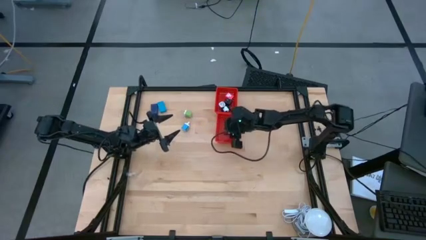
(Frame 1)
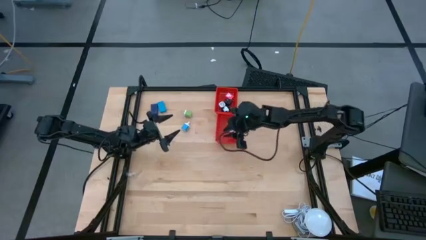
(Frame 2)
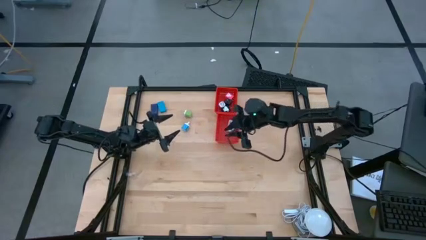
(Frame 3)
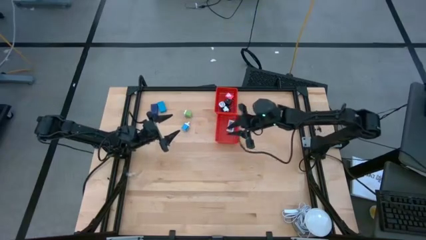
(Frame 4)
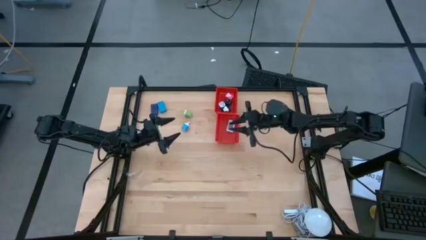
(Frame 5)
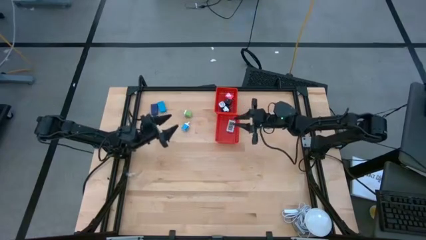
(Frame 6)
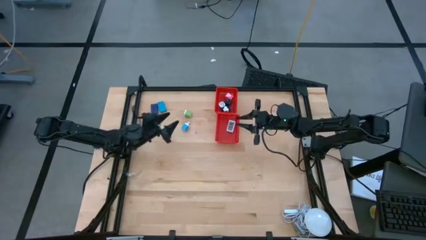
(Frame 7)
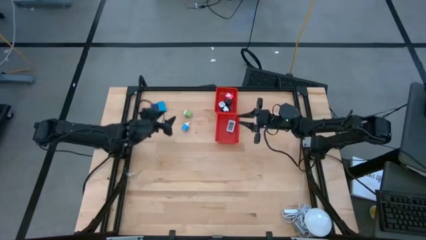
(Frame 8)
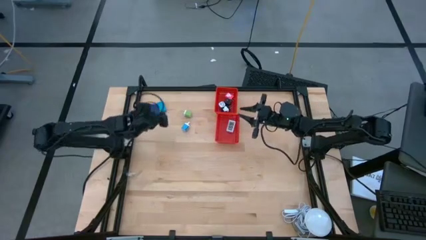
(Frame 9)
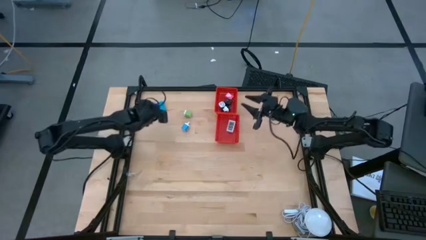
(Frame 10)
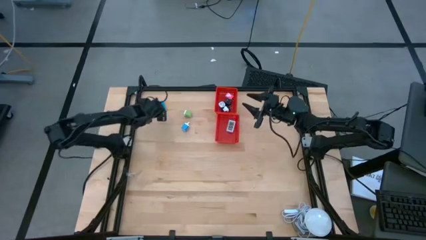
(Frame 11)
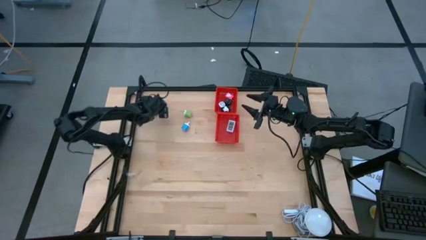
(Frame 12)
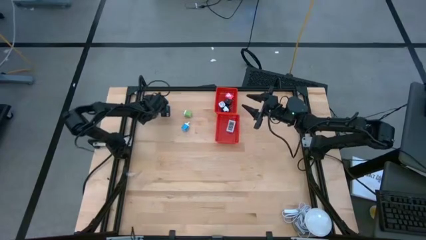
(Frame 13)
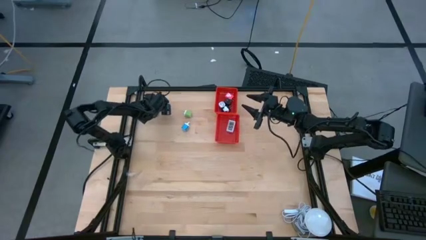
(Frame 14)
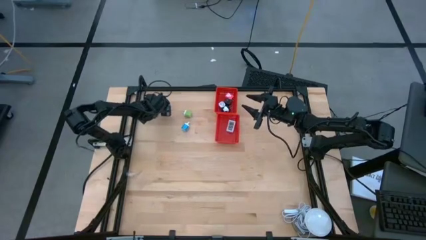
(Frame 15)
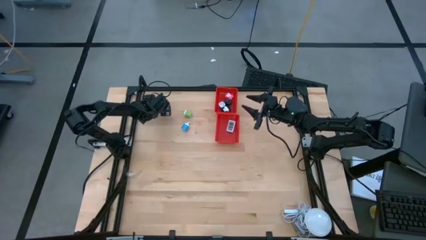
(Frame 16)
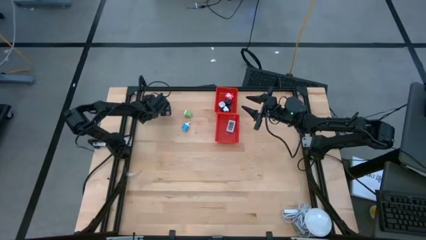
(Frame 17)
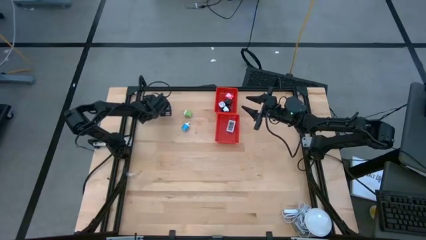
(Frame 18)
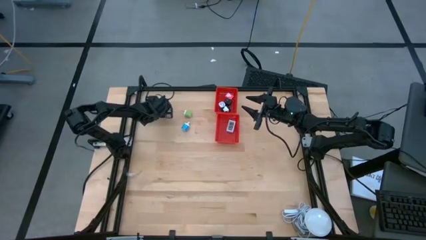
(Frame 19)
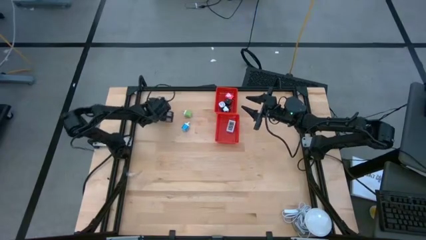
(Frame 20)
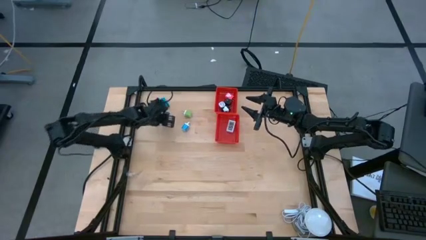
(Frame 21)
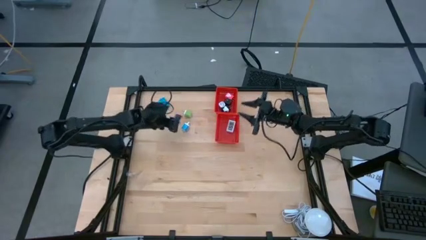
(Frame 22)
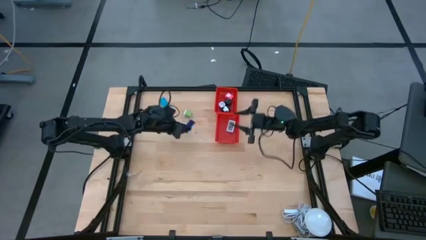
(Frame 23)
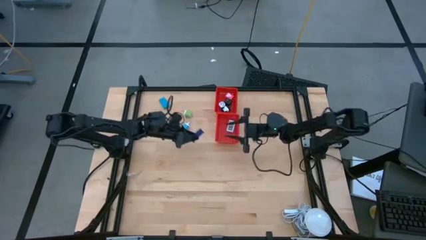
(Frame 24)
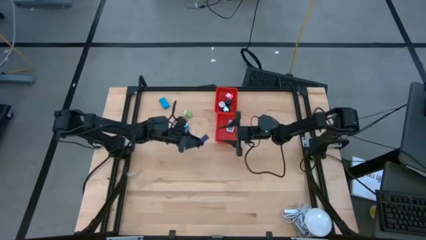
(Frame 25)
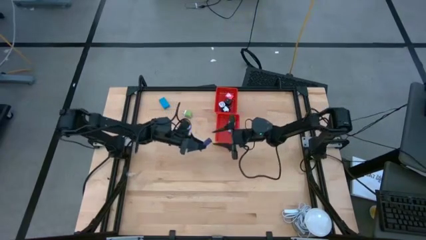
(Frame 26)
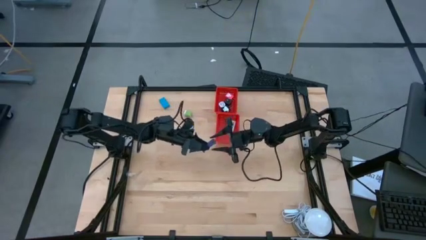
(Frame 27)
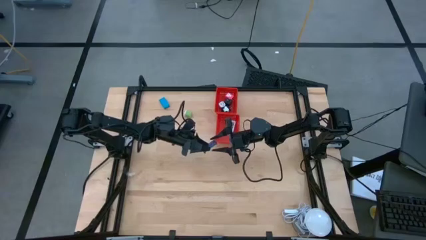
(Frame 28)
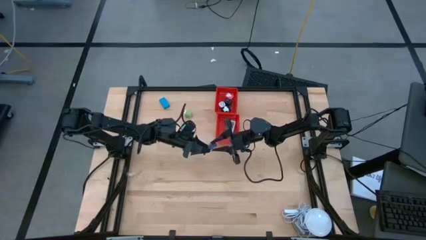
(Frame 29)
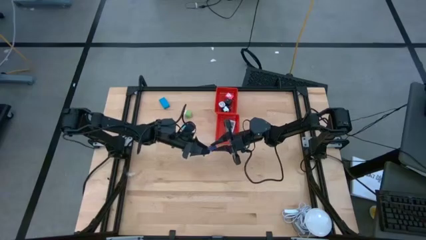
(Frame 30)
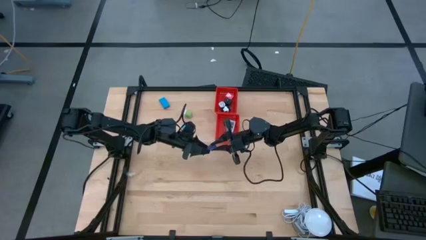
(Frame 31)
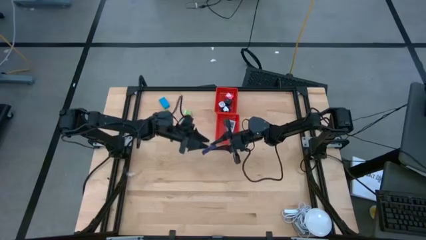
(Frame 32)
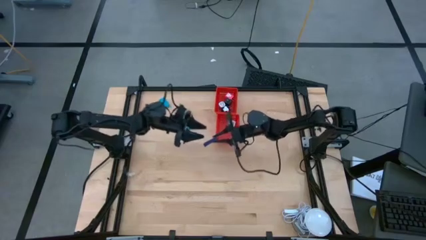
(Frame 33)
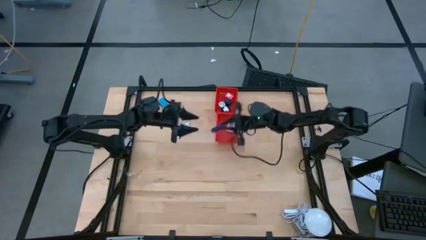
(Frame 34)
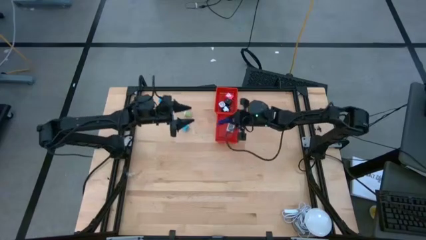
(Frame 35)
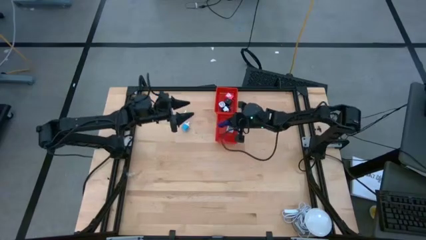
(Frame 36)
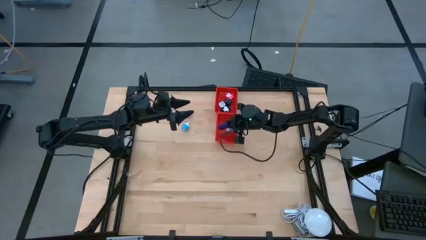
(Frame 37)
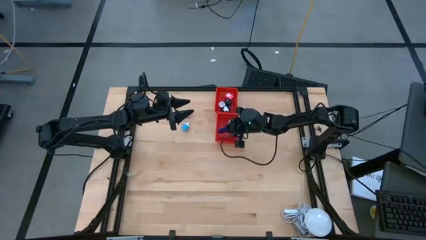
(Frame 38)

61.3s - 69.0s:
Task: Pick & Place Office items
Put the blue digital clock into the bottom red basket

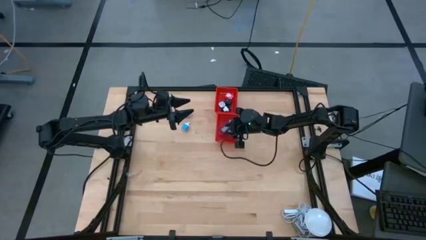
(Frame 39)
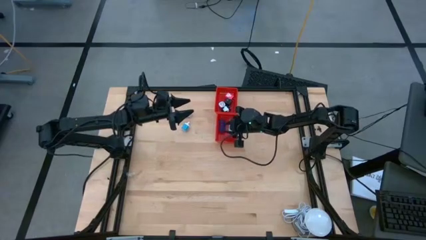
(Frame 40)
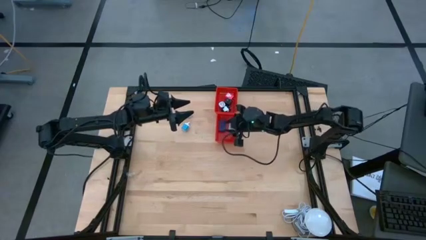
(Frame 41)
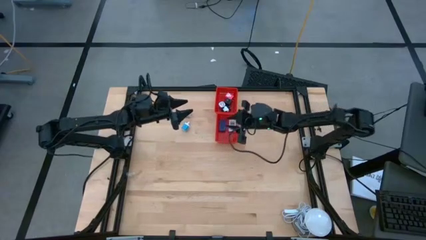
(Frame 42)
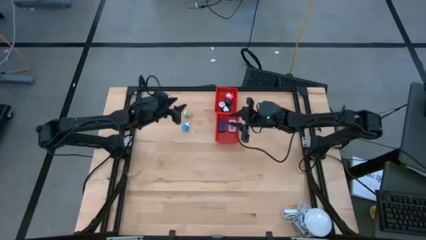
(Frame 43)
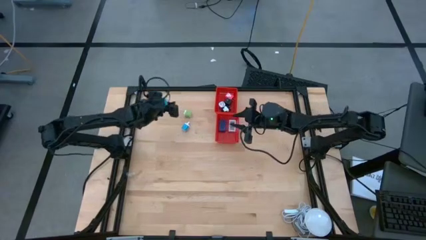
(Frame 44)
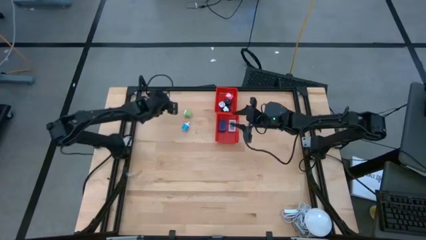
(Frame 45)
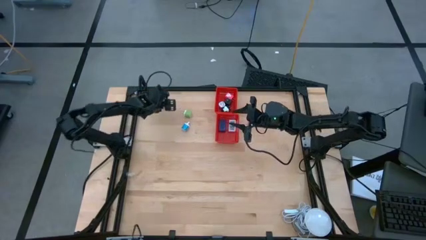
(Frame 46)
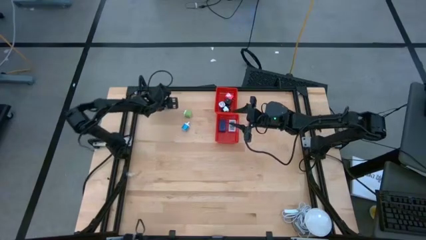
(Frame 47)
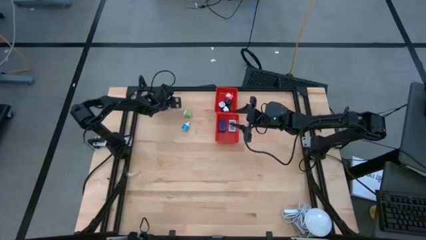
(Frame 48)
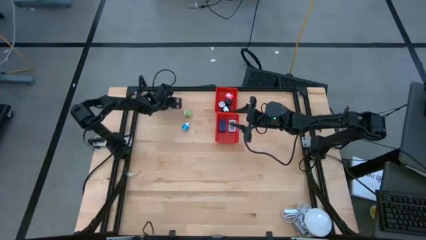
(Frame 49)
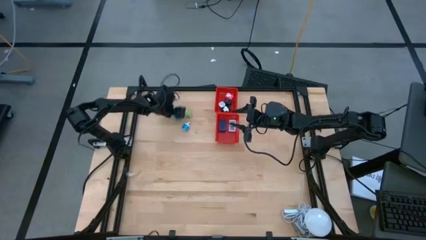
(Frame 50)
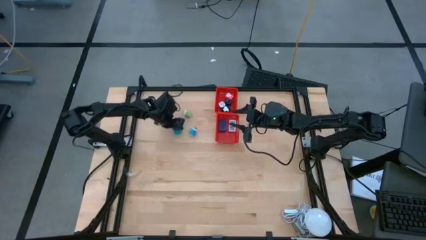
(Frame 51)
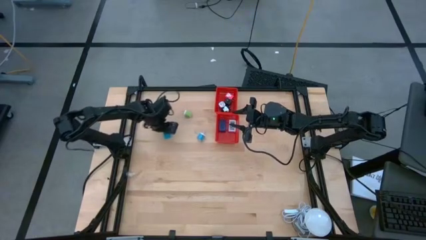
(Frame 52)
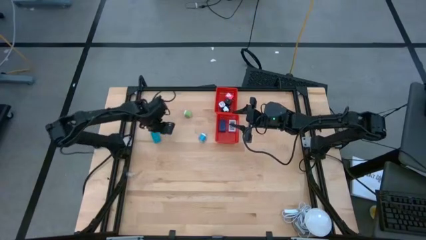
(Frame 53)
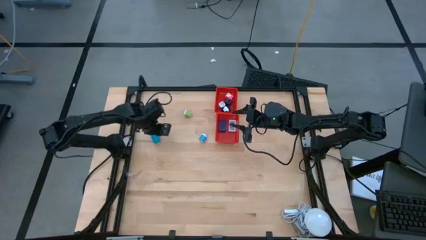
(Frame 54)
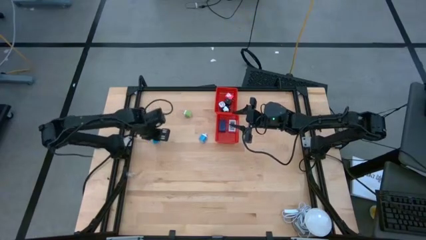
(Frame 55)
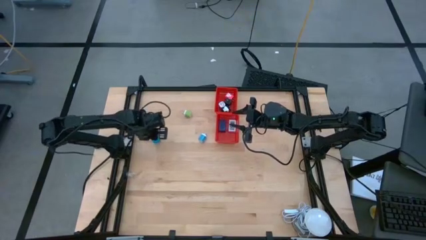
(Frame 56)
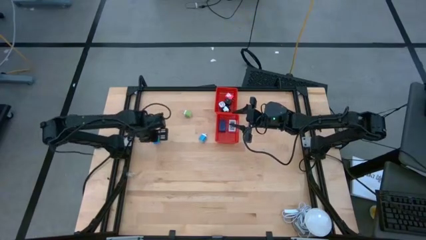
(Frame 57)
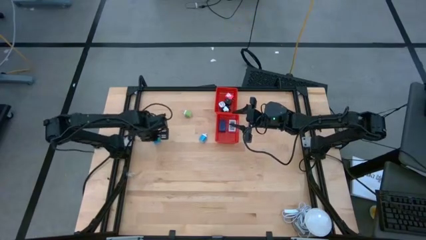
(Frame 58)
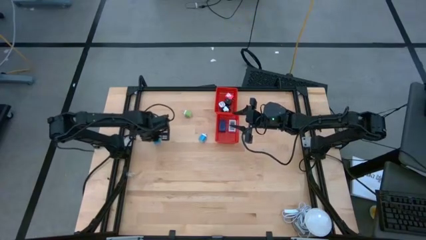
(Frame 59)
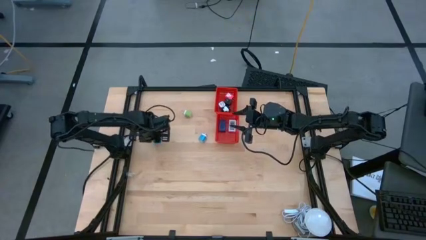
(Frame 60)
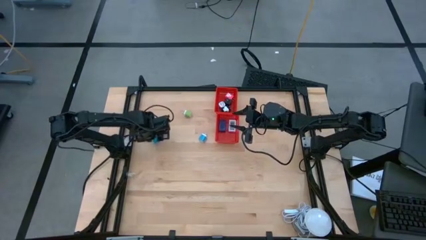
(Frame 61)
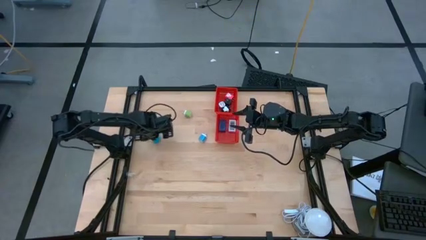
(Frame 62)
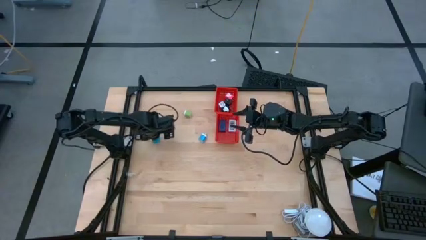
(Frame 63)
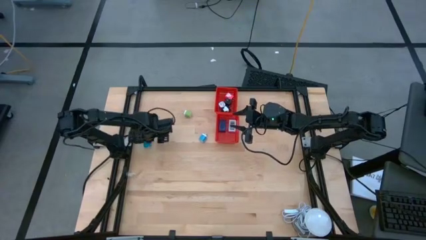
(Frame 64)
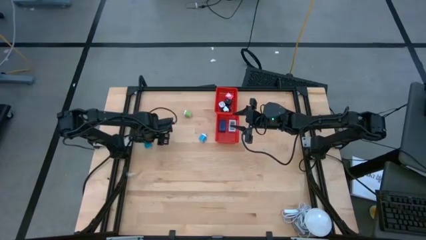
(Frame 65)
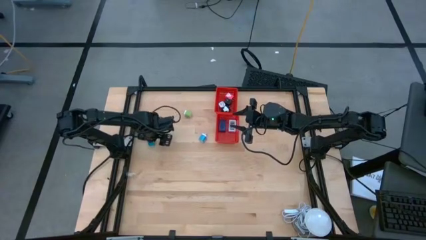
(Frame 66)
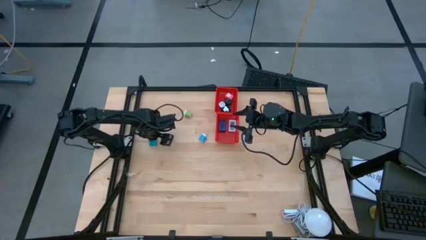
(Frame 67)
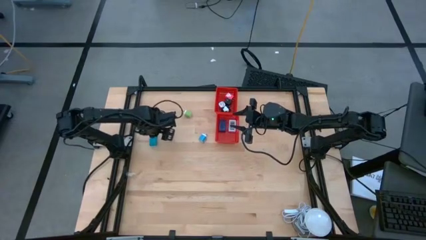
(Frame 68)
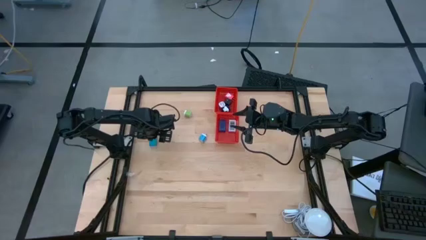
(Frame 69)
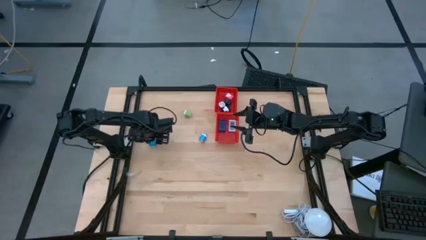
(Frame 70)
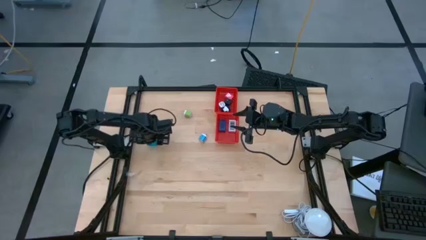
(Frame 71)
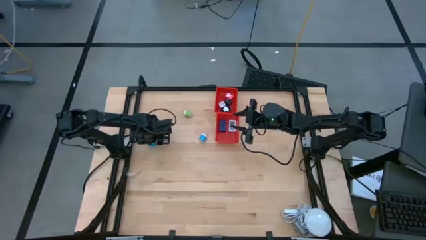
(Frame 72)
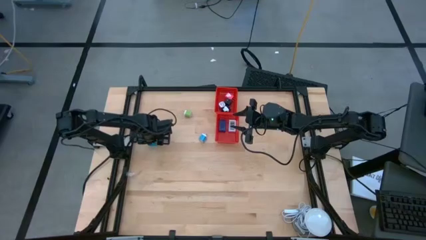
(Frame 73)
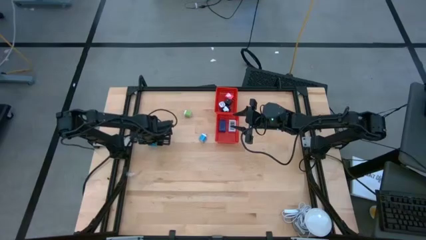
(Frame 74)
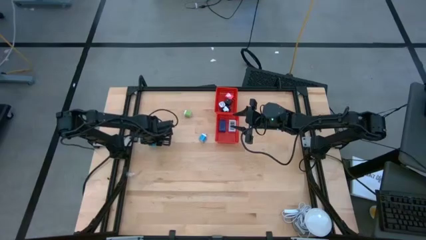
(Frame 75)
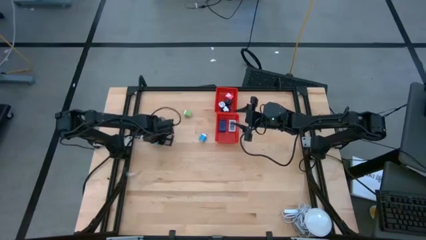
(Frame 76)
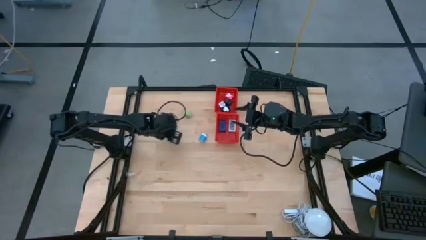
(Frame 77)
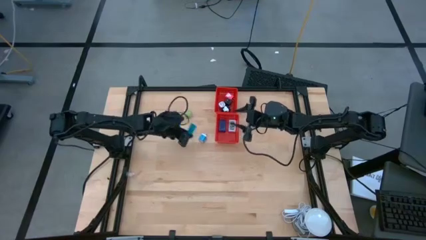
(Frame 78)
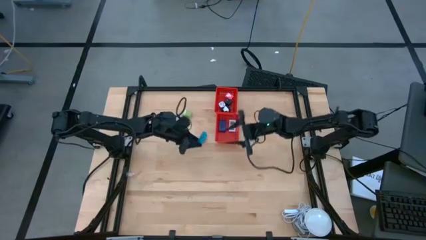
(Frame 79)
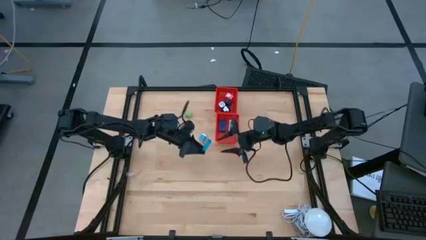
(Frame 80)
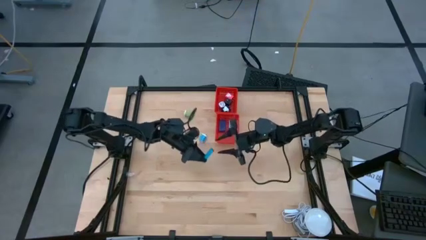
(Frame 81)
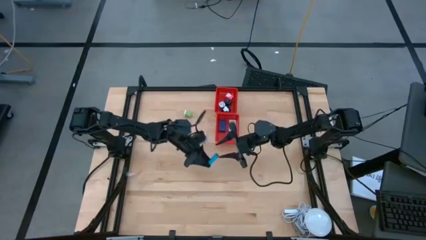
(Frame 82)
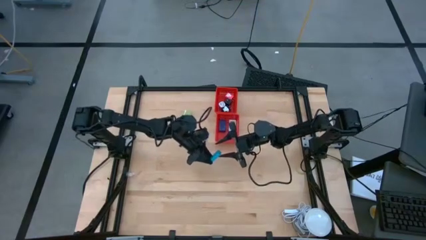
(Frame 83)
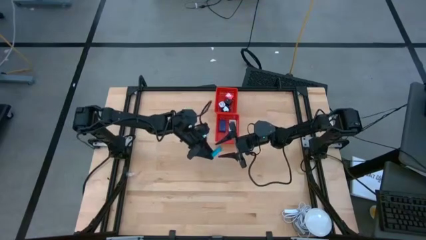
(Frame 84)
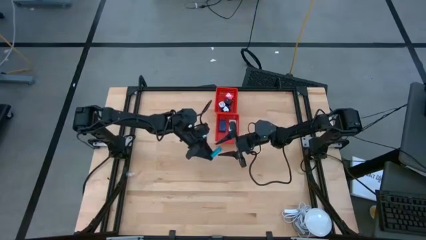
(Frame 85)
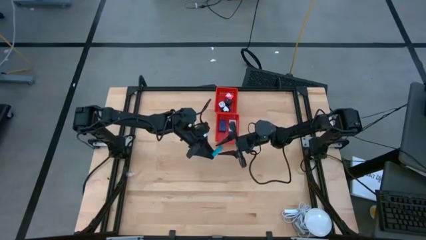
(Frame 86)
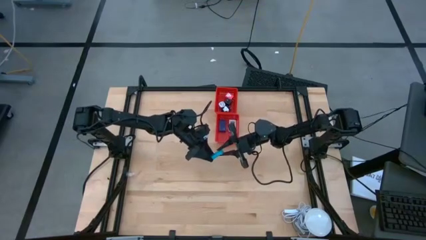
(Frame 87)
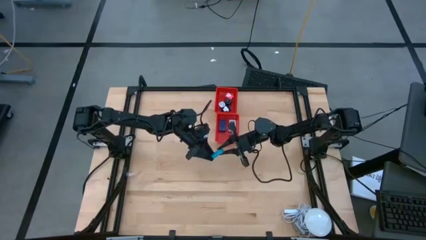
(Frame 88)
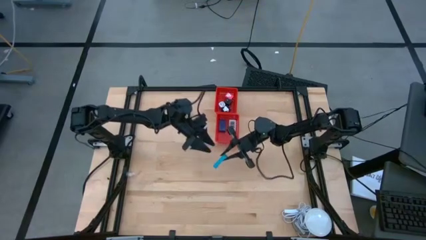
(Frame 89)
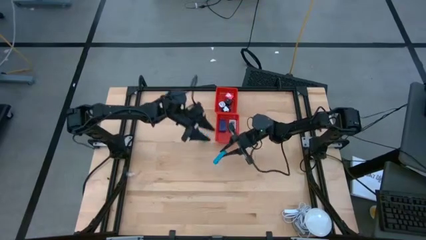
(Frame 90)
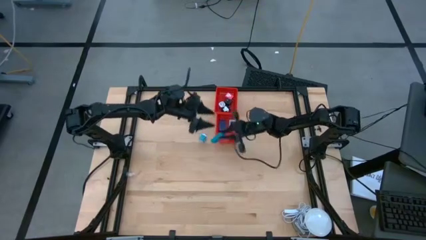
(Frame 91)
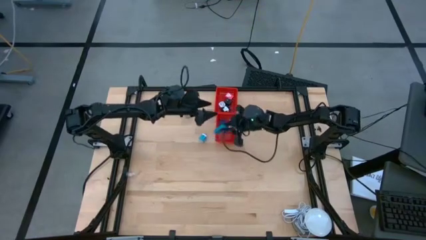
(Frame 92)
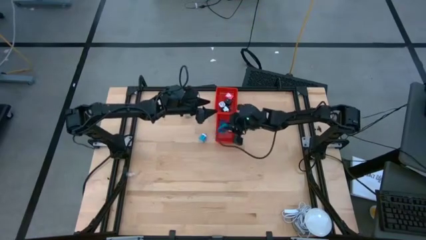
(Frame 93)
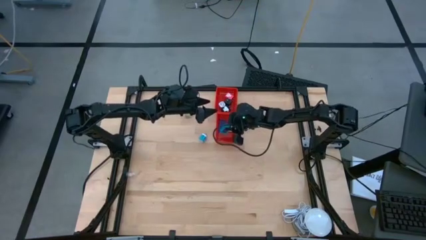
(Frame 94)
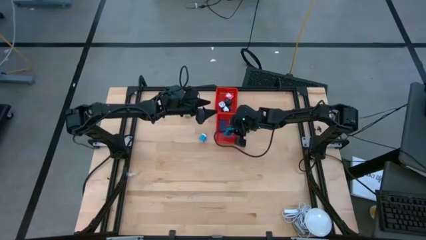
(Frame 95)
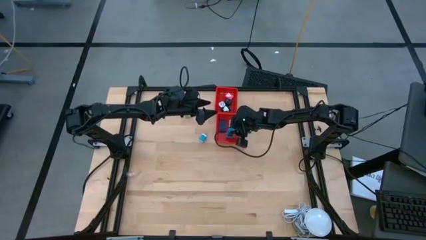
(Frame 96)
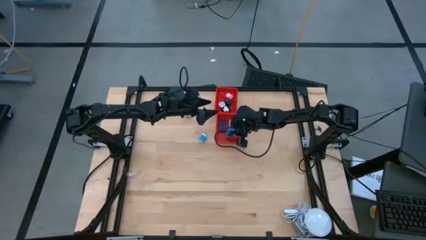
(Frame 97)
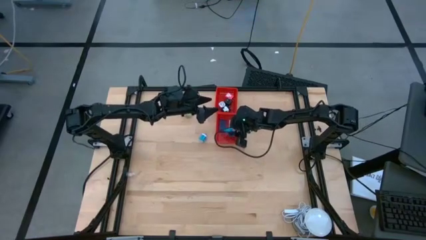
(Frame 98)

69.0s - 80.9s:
Put the light blue digital clock into the bottom red basket
